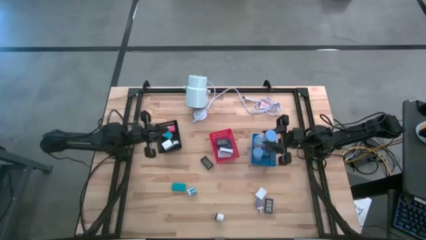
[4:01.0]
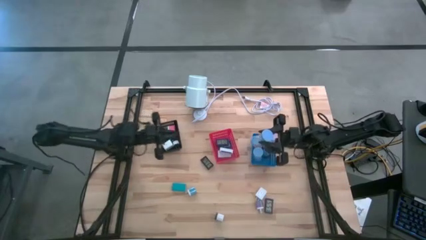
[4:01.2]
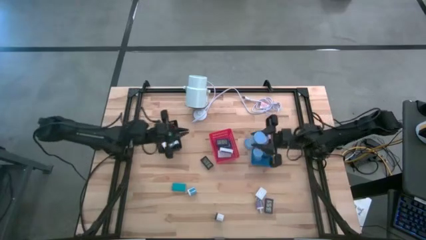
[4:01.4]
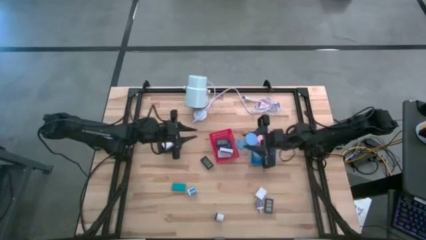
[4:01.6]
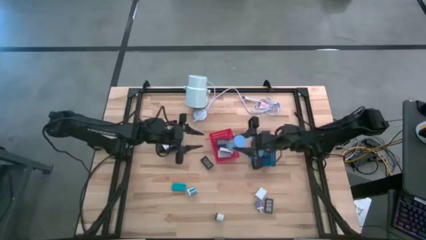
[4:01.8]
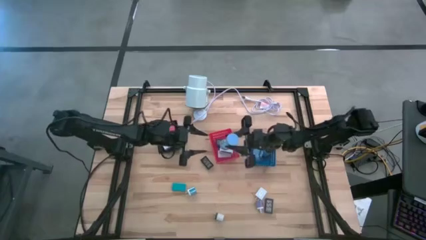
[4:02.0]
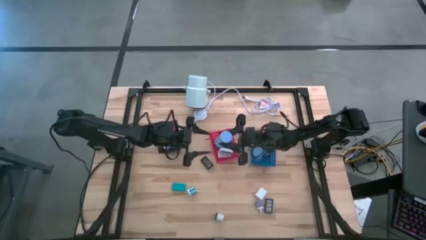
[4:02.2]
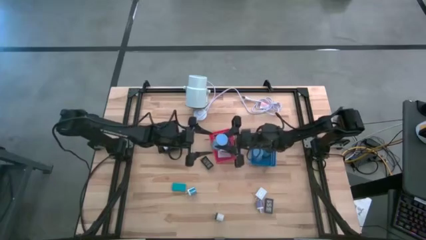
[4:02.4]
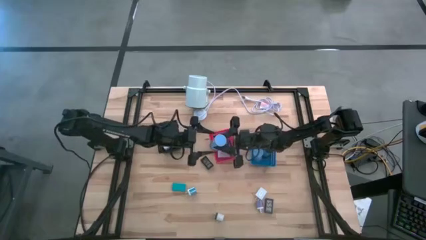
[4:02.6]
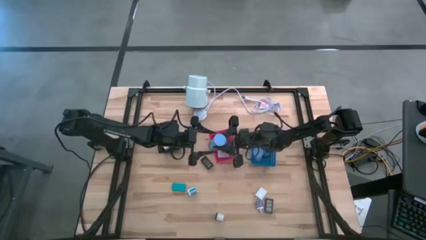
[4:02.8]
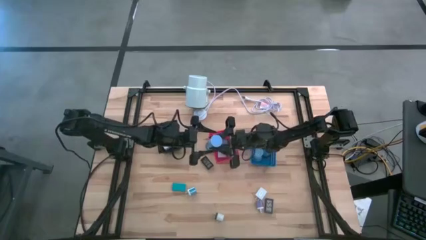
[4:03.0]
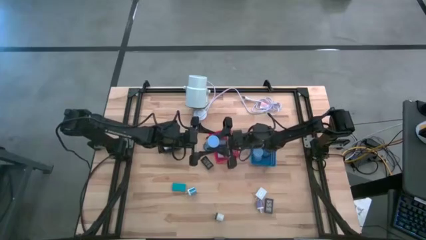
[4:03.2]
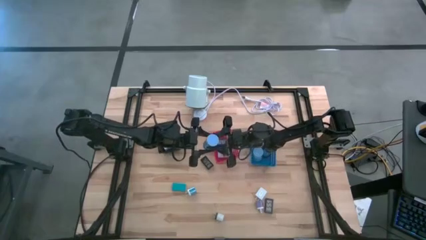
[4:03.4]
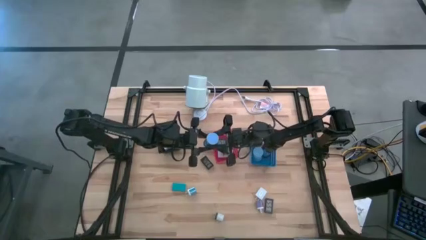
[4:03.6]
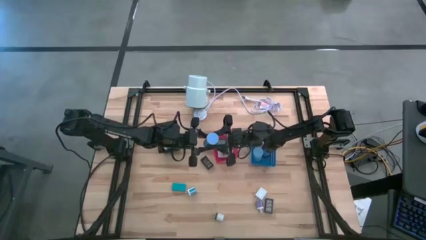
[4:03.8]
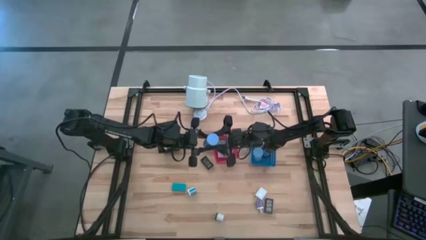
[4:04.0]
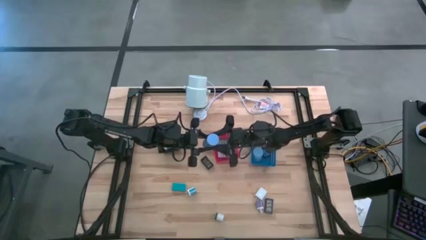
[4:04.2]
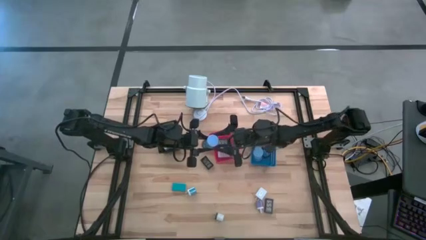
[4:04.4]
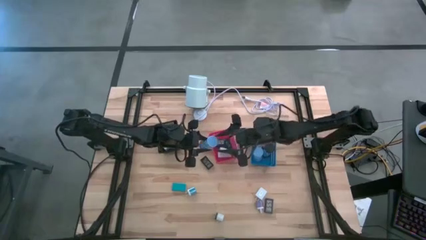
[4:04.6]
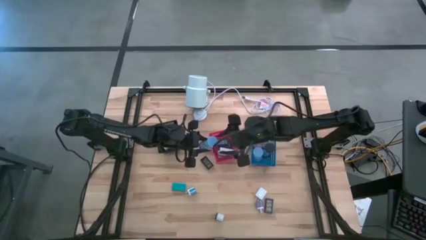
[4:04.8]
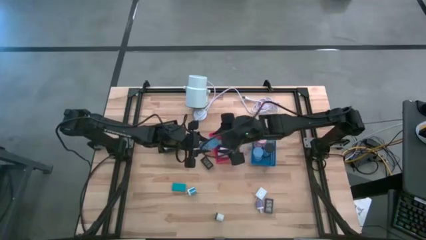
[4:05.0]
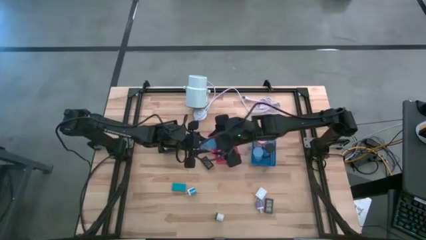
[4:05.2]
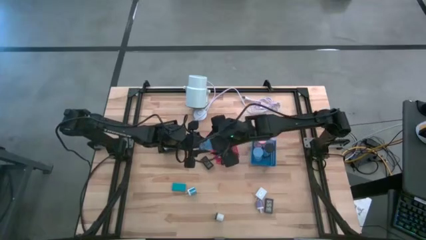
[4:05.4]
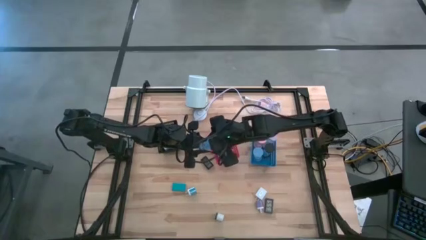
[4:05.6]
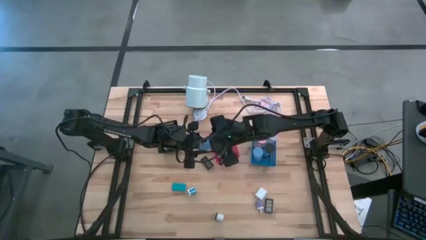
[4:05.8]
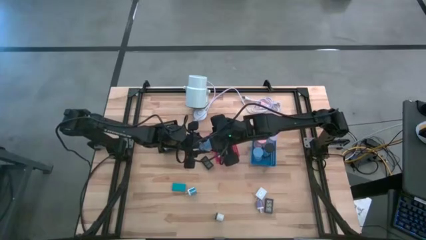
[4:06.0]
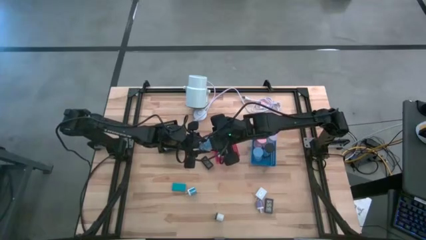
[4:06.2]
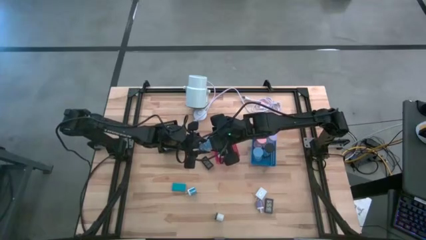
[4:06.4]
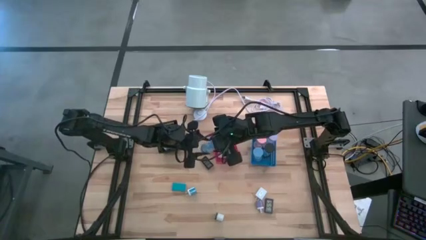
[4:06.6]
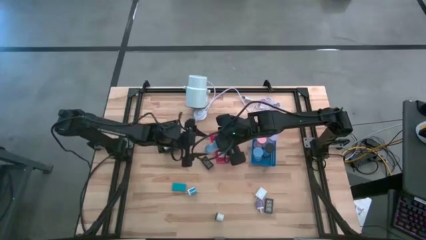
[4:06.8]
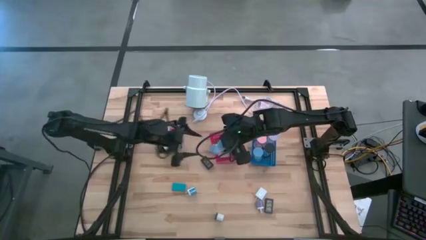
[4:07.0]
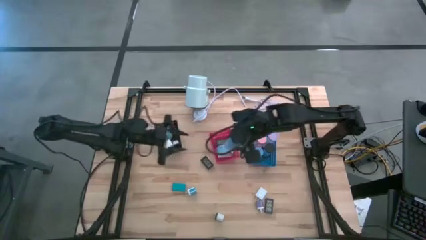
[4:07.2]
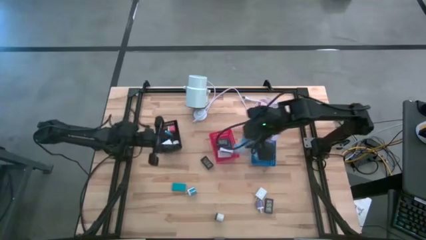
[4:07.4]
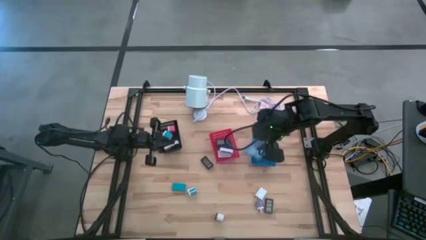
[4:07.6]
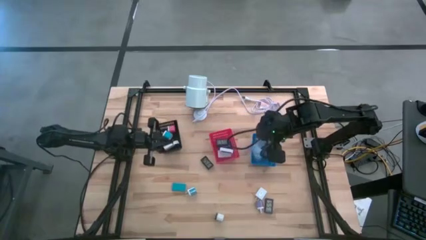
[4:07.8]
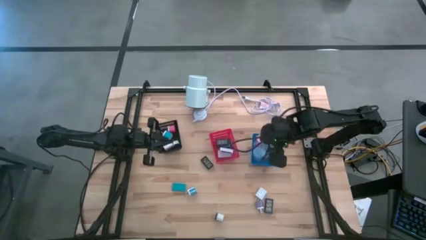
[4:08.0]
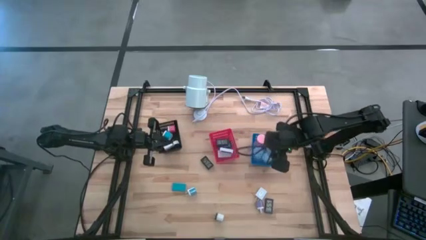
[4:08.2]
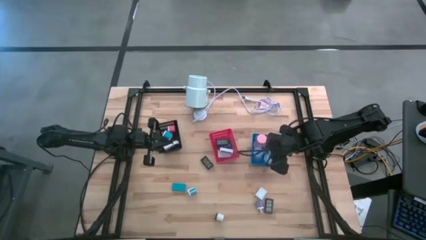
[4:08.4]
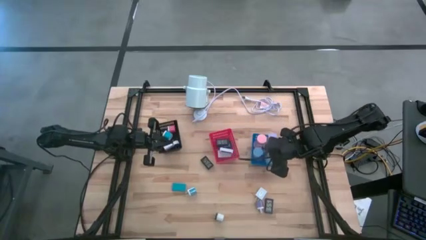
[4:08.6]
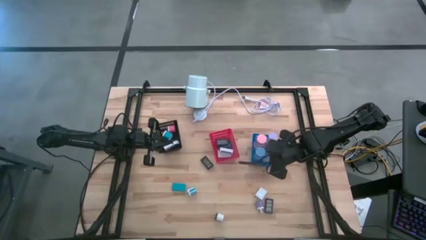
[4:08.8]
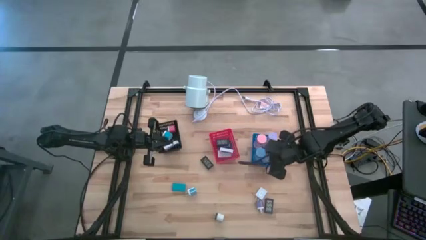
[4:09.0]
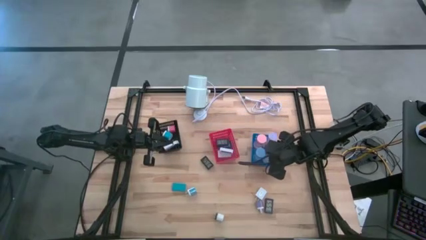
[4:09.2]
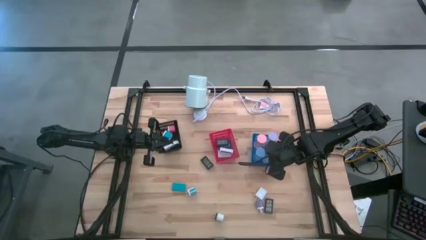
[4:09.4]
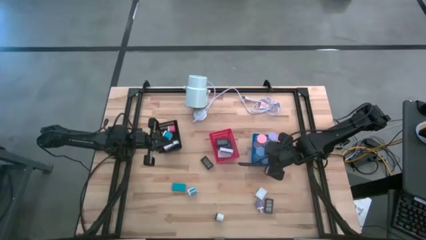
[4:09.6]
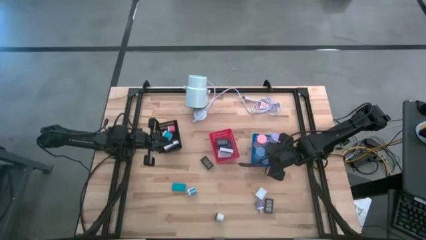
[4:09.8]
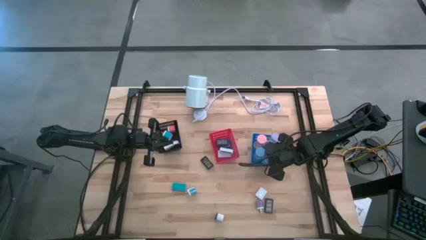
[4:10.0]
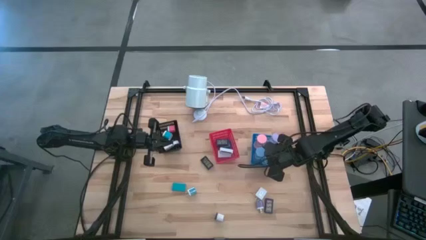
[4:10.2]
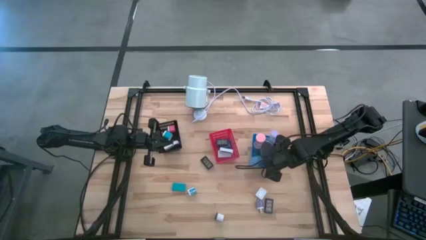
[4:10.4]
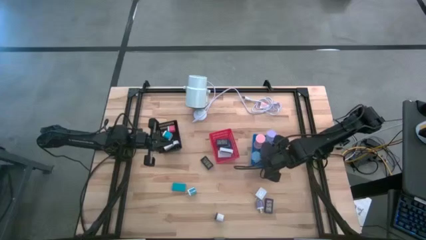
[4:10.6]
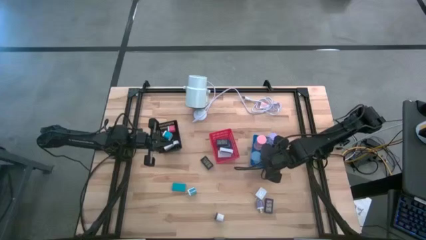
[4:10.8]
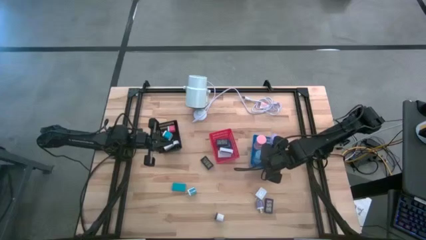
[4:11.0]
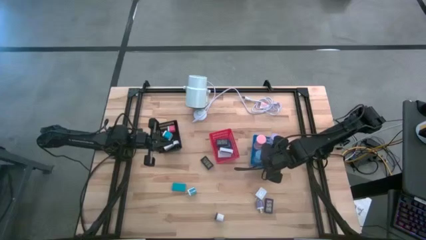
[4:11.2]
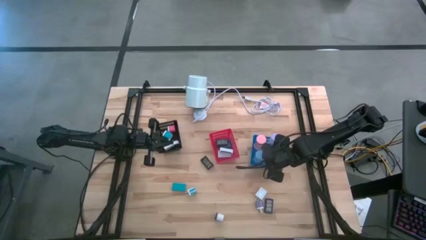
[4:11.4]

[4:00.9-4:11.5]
Task: Pick & Place Office items
Put the blue hourglass into the blue bin

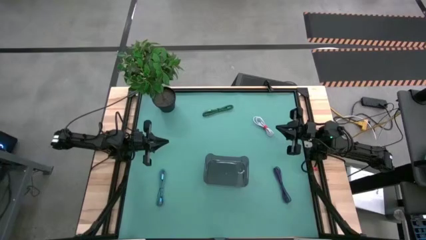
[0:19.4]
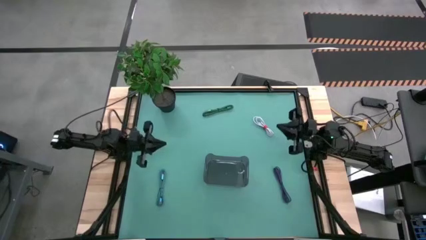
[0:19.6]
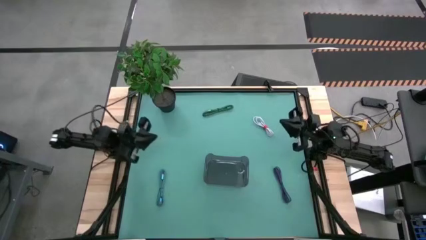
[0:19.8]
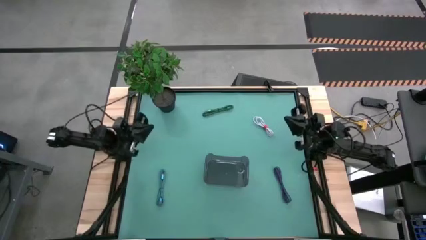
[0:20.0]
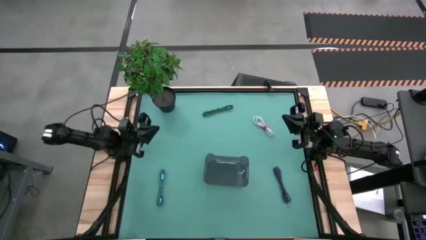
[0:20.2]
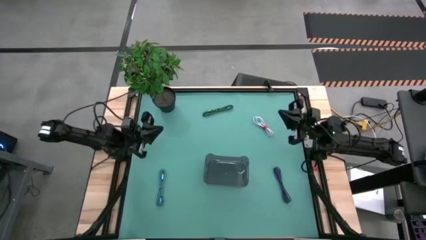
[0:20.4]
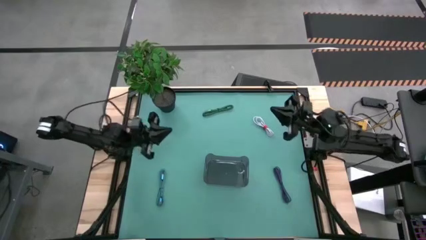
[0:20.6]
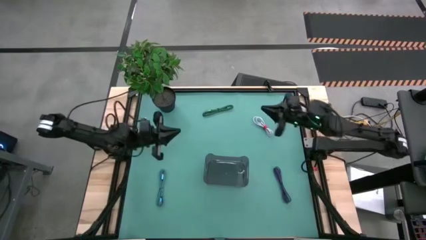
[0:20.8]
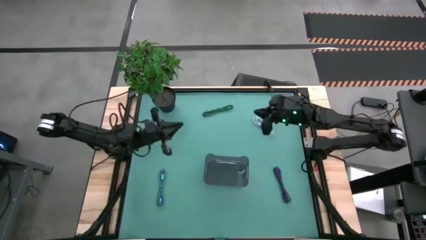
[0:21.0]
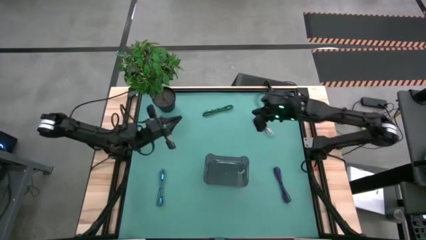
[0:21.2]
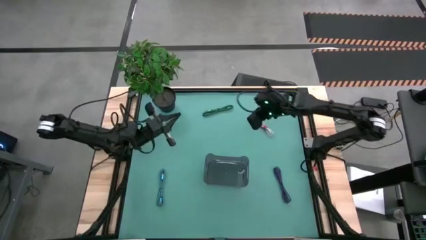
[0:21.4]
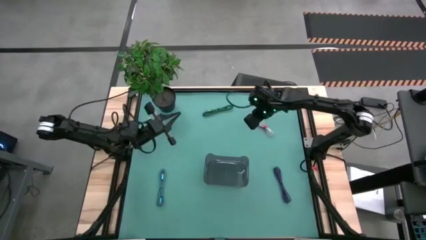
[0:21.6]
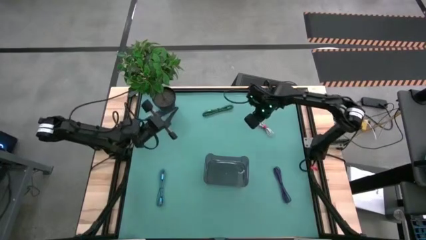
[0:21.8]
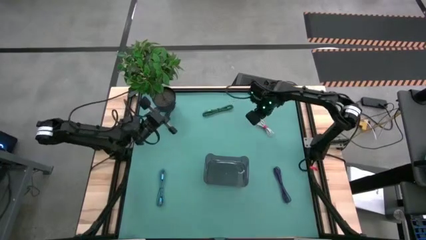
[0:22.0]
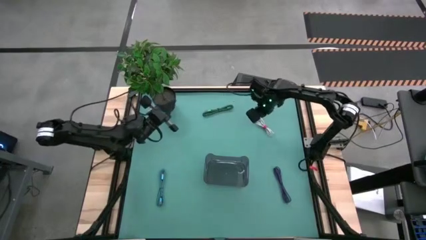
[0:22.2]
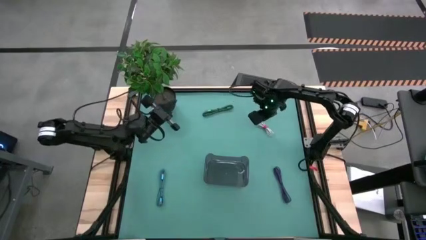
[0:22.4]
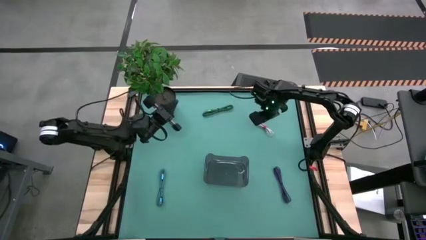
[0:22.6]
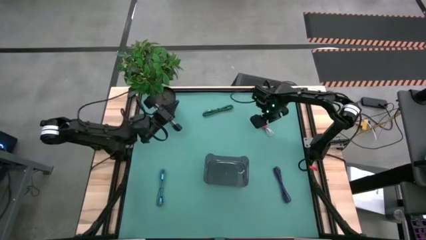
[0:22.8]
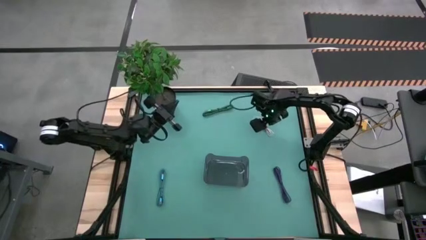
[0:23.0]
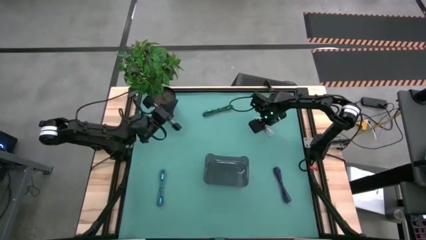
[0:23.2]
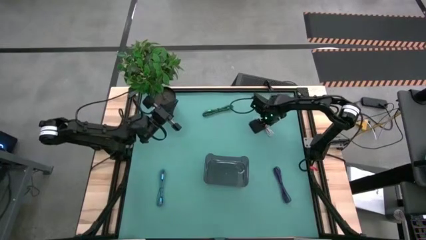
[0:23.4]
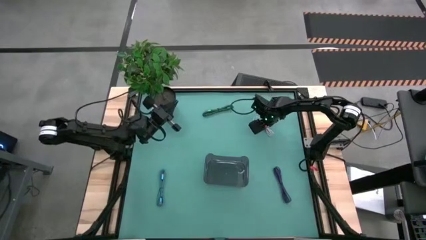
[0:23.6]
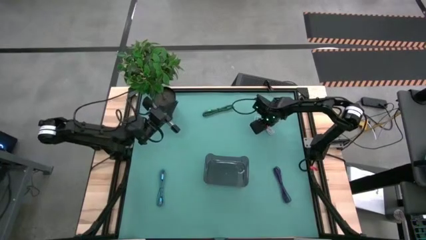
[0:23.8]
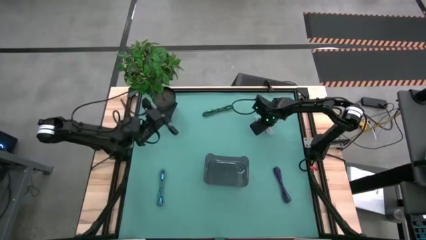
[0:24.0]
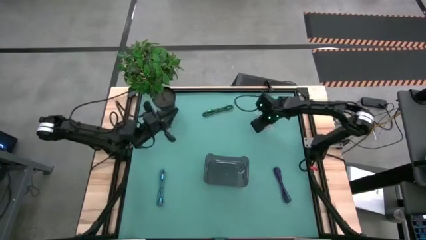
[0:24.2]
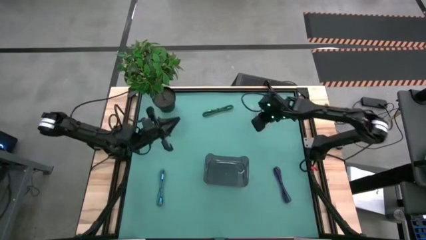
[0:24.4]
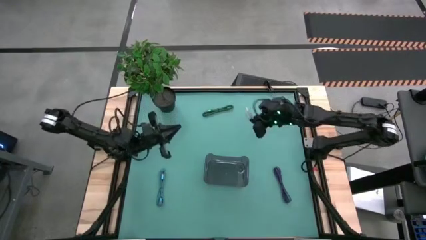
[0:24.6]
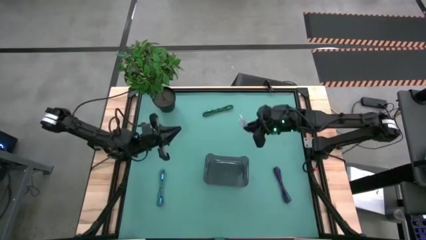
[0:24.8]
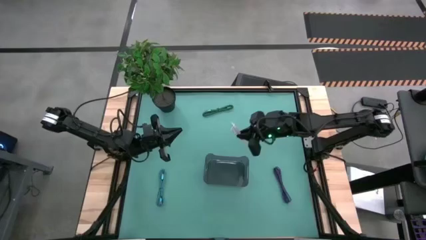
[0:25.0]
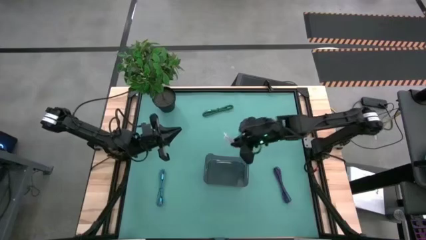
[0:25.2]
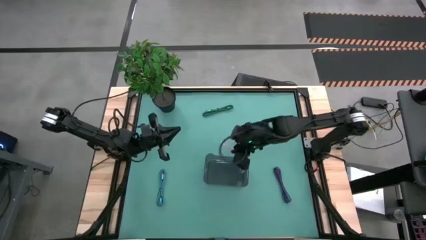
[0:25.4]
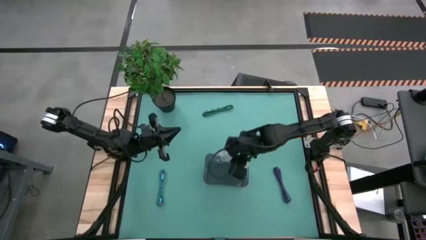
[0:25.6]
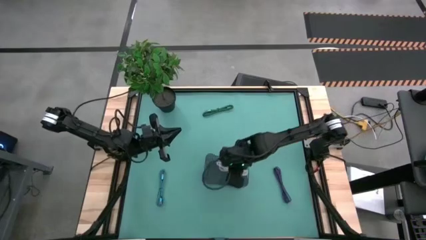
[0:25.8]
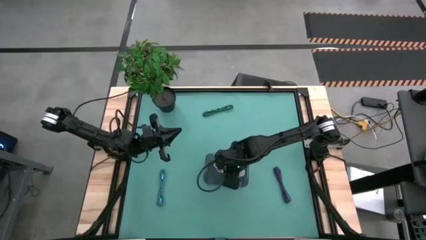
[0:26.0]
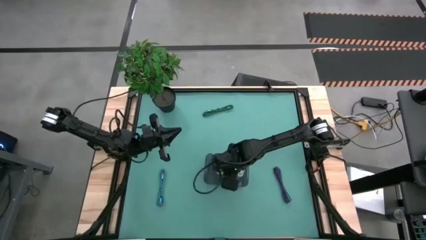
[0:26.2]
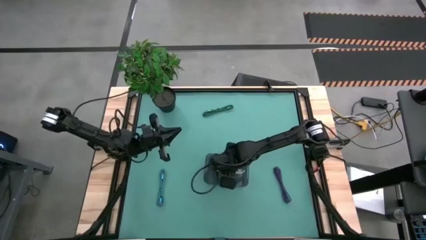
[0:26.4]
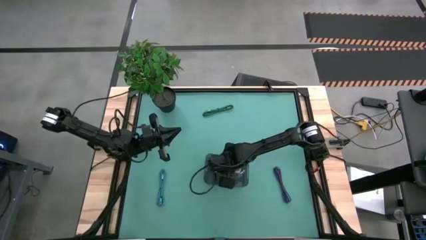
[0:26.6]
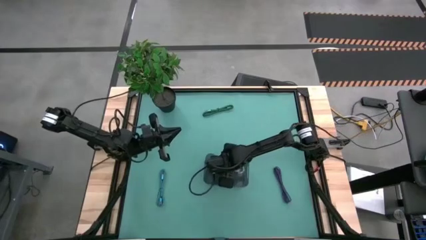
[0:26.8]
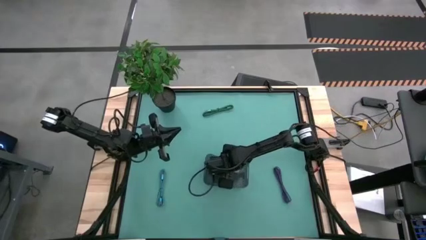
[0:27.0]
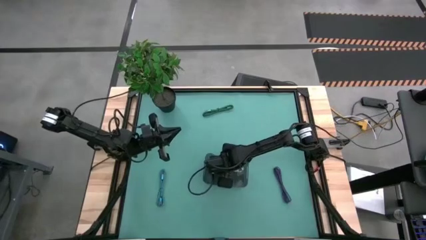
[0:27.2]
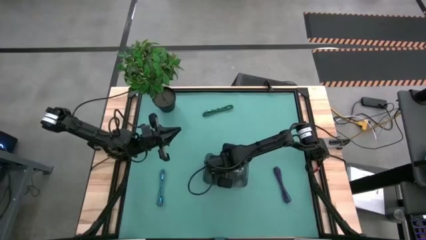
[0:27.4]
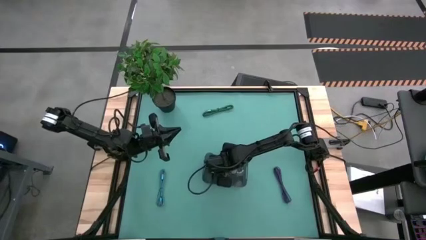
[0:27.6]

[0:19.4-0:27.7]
Task: Pick and place USB-C Cables
Put the white charger cable into the black bin
